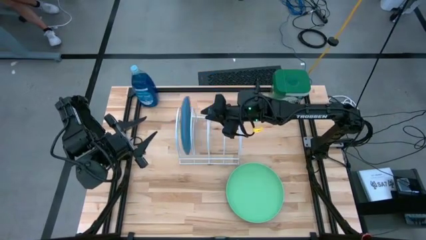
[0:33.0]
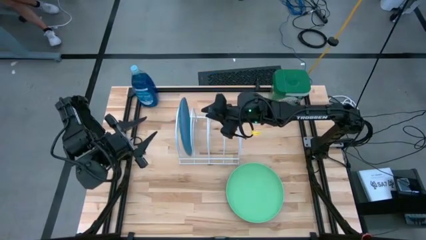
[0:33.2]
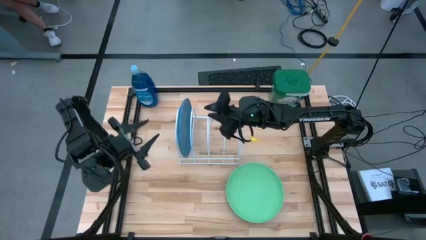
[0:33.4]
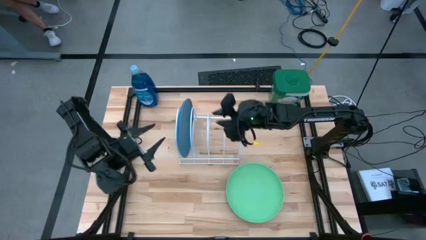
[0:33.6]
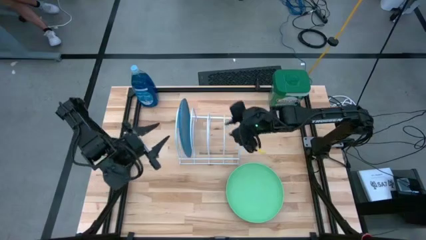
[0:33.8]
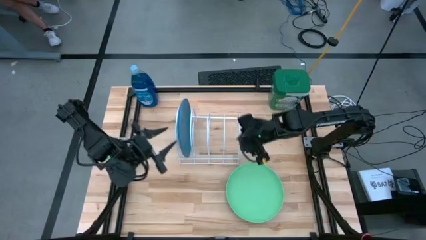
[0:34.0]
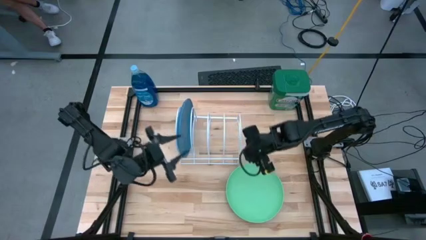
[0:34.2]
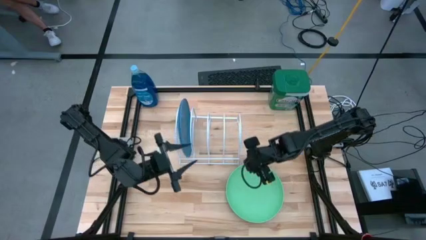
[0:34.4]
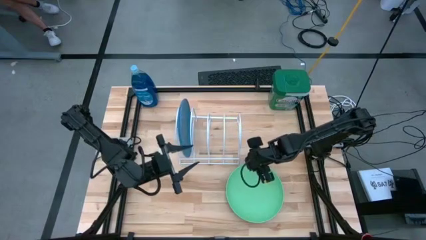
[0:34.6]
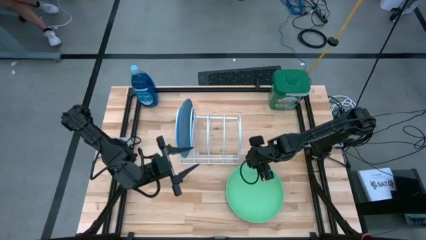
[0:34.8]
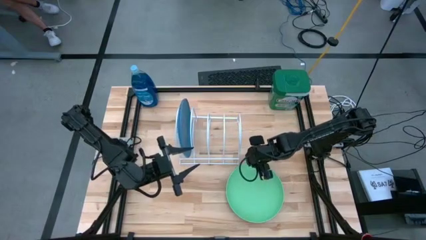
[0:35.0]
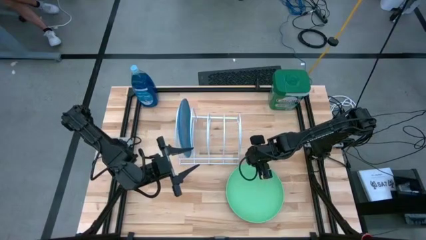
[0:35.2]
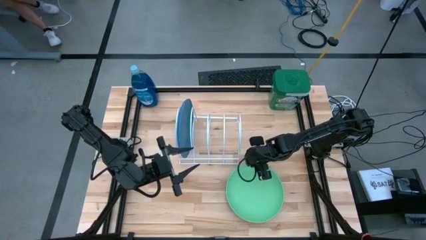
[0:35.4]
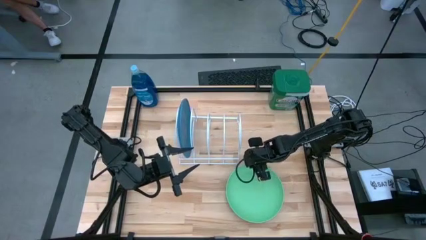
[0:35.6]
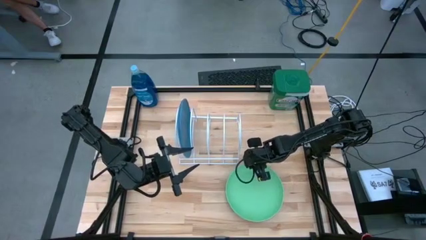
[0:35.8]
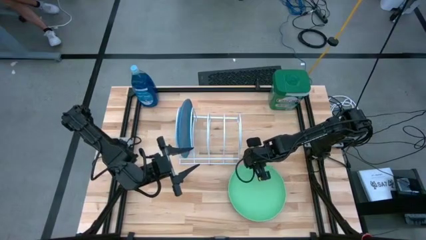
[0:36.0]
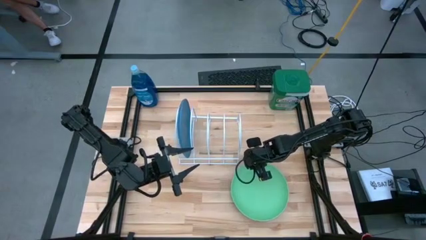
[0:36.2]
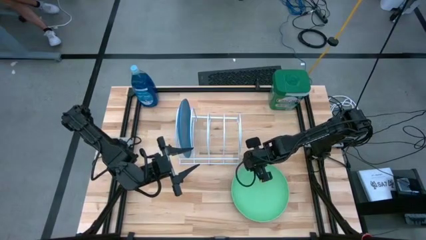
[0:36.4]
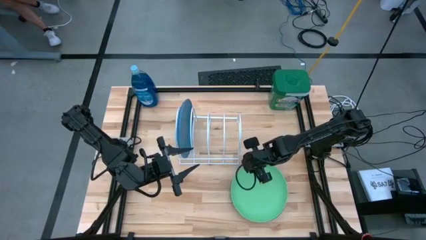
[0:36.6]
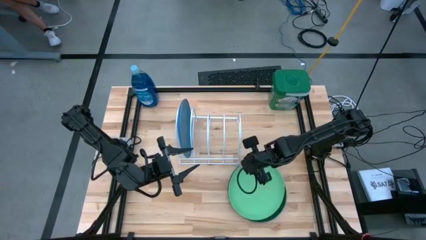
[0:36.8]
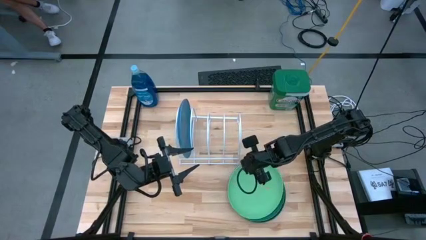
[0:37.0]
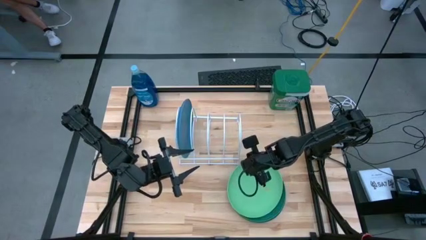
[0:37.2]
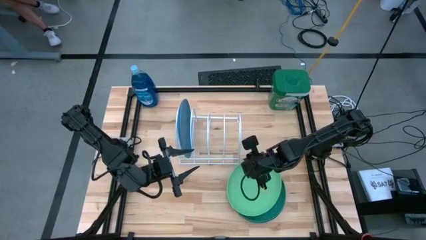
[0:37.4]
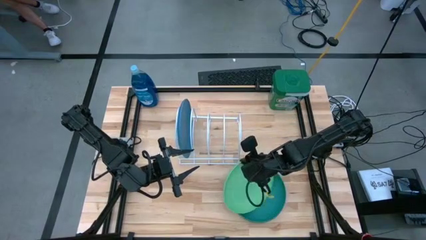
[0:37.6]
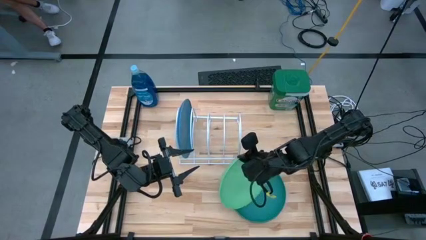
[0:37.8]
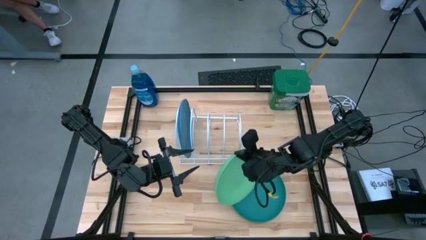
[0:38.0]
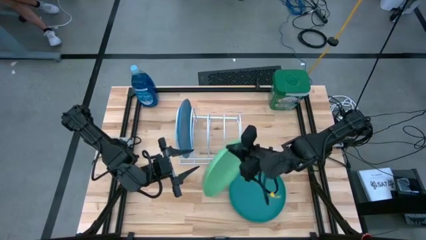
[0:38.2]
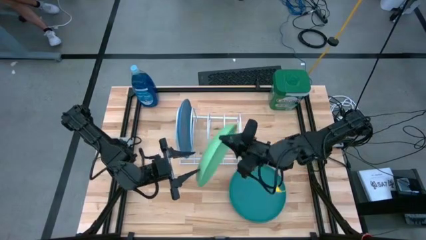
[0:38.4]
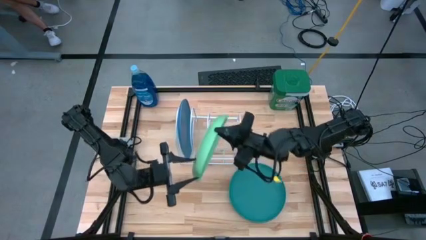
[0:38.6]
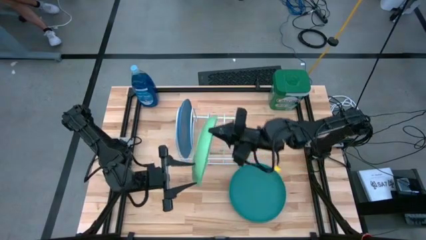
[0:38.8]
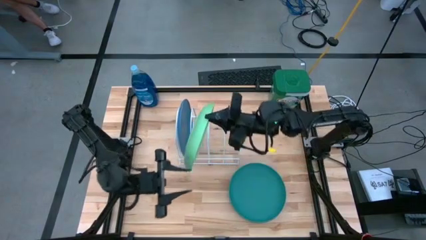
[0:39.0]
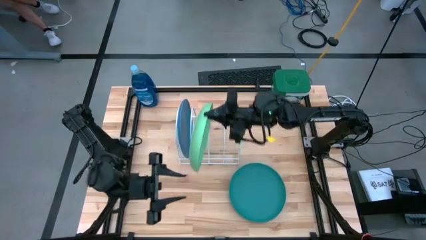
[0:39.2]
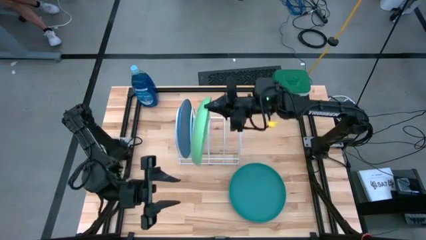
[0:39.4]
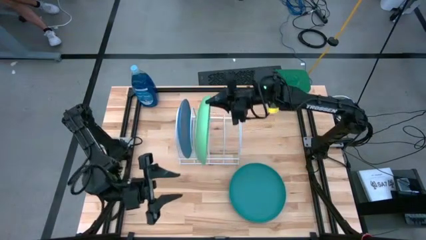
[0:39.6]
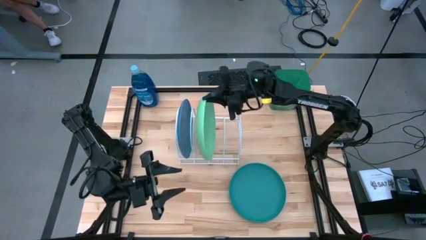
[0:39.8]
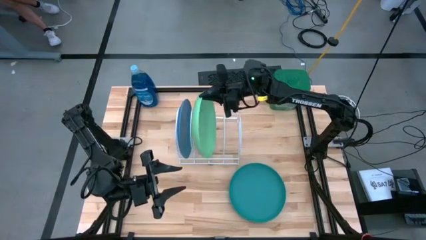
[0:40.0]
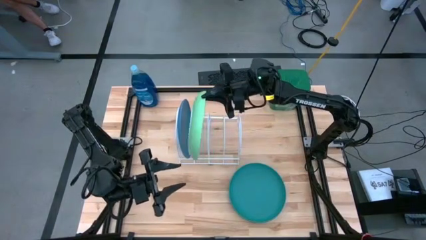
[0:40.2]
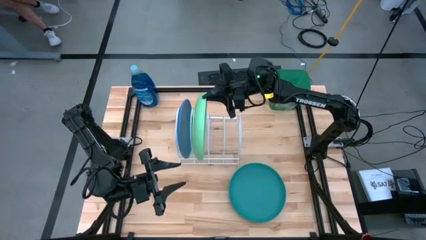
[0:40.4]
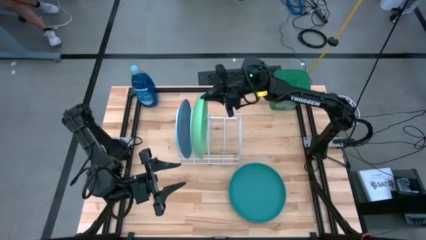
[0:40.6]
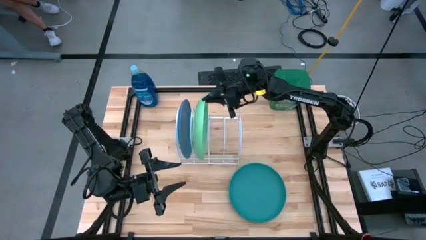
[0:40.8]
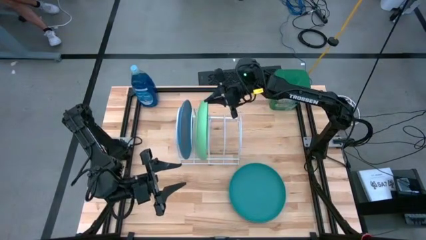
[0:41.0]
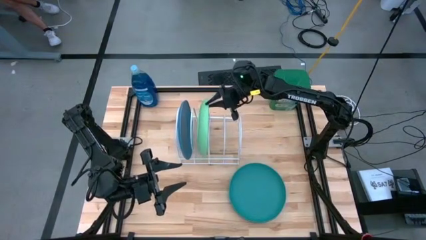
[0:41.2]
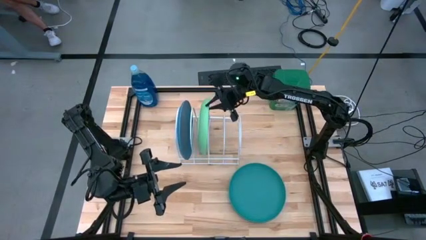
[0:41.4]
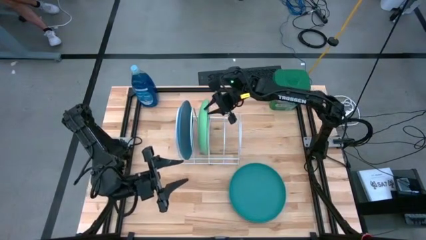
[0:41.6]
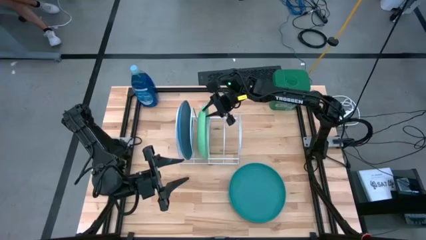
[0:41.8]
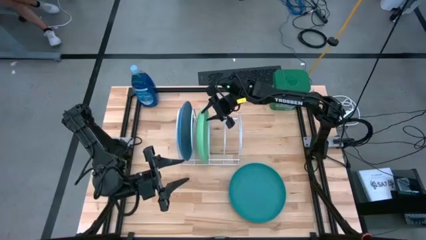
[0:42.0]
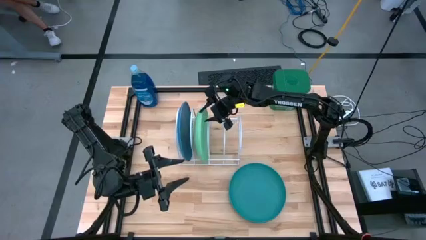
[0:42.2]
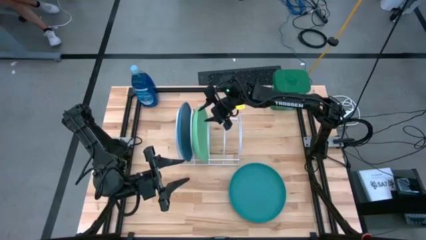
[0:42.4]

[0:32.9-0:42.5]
Task: Sort dishes
Put the light green plate in the dish rack

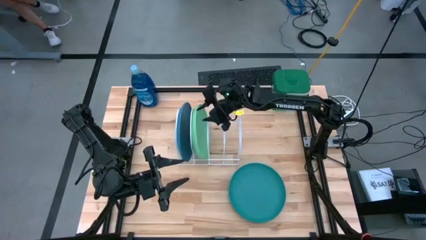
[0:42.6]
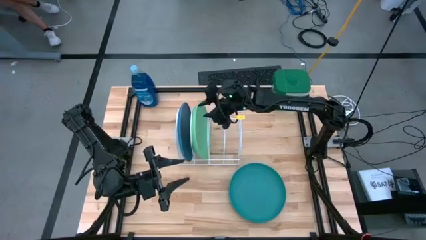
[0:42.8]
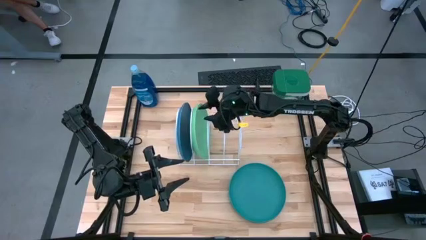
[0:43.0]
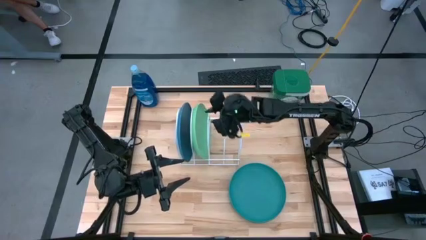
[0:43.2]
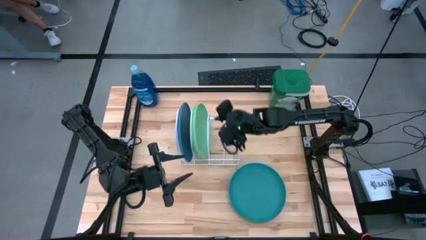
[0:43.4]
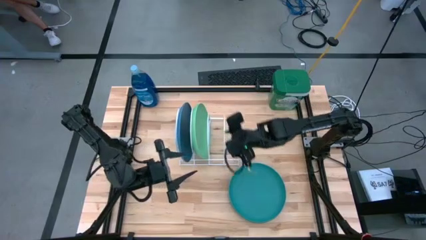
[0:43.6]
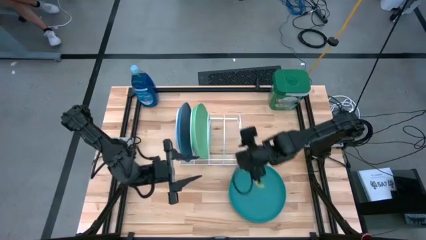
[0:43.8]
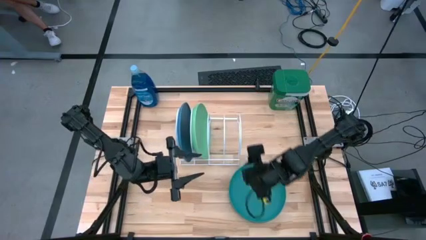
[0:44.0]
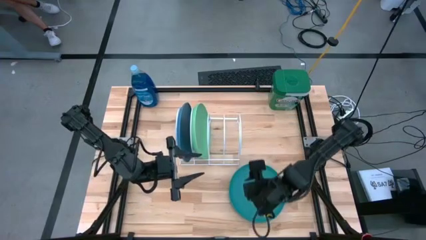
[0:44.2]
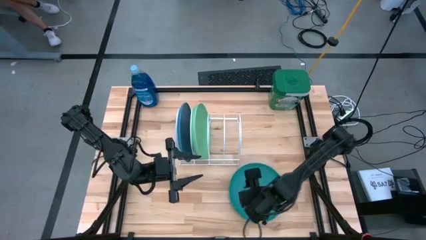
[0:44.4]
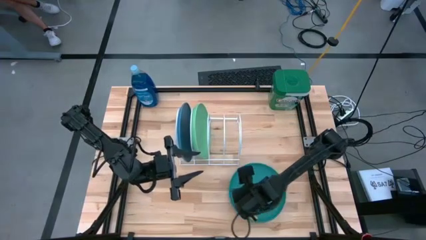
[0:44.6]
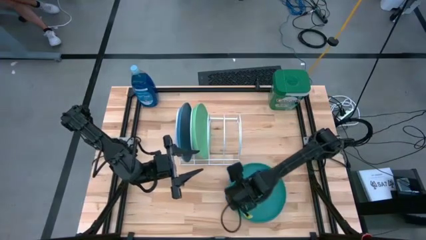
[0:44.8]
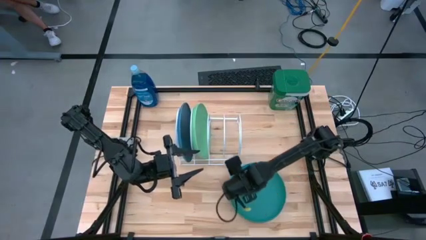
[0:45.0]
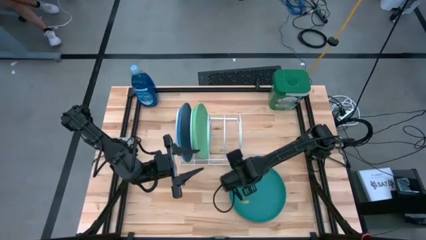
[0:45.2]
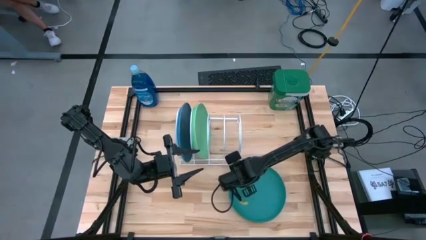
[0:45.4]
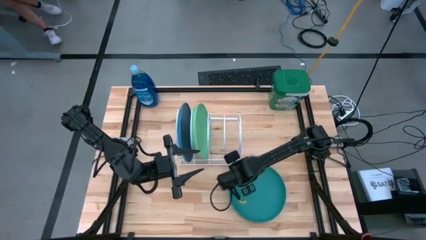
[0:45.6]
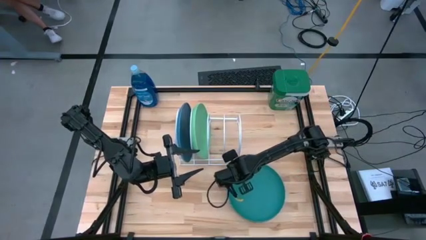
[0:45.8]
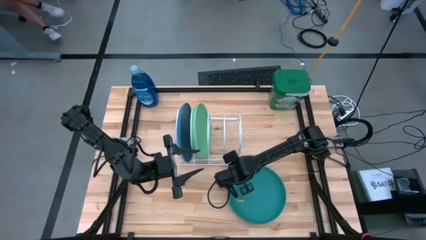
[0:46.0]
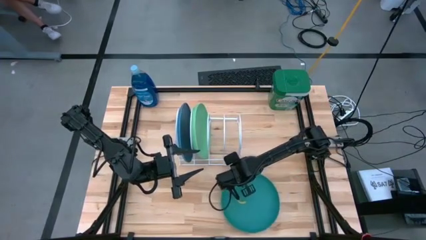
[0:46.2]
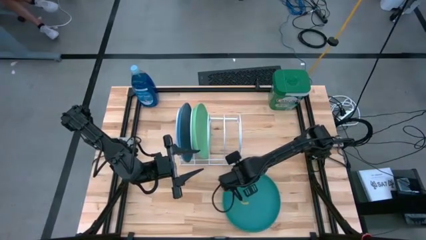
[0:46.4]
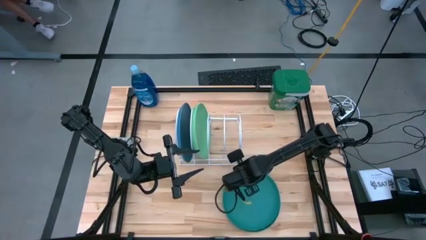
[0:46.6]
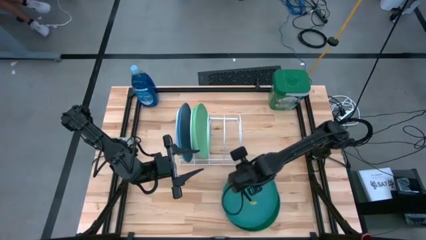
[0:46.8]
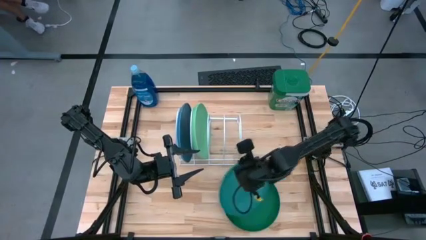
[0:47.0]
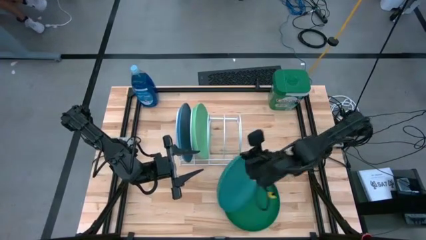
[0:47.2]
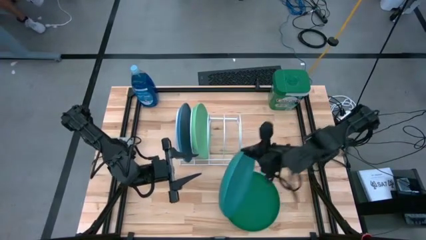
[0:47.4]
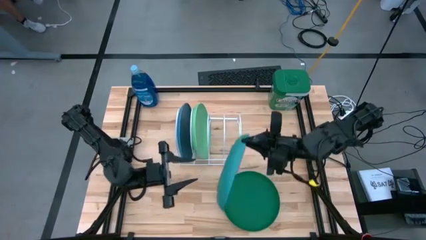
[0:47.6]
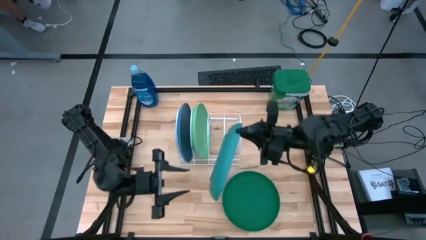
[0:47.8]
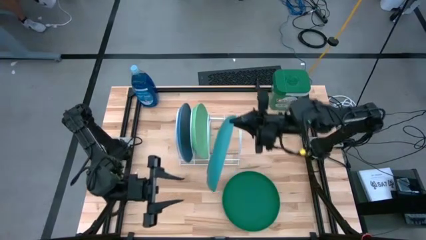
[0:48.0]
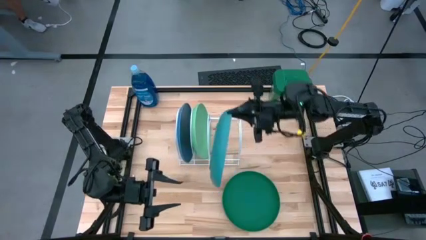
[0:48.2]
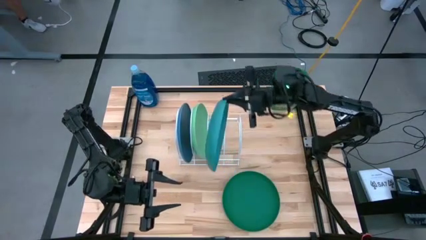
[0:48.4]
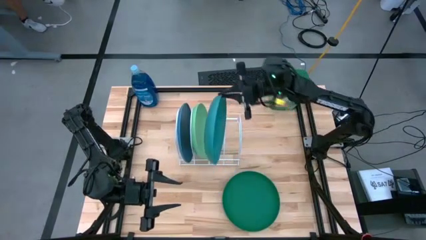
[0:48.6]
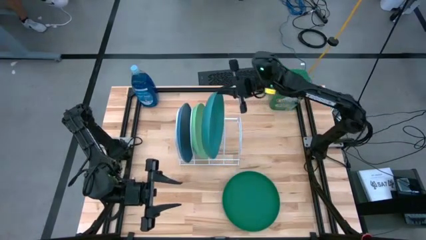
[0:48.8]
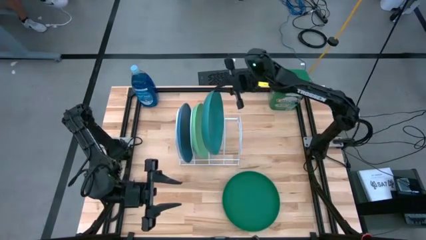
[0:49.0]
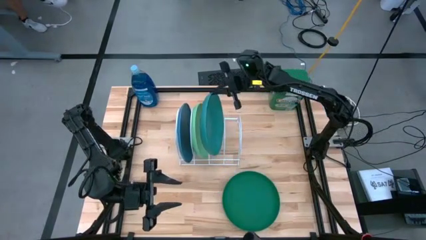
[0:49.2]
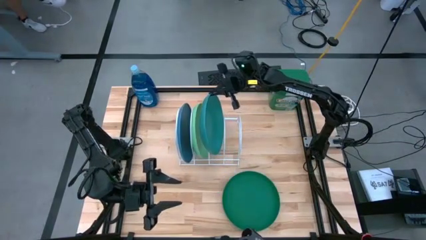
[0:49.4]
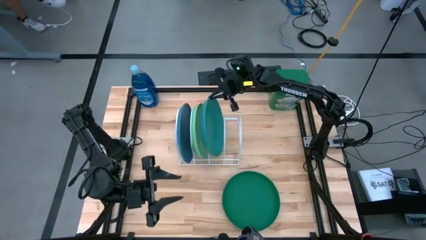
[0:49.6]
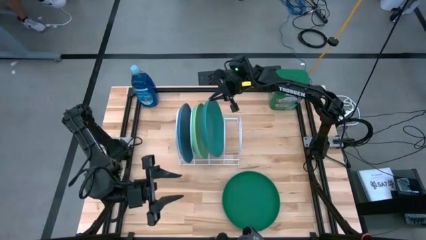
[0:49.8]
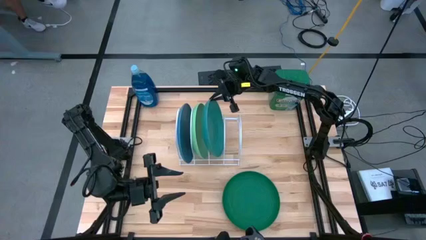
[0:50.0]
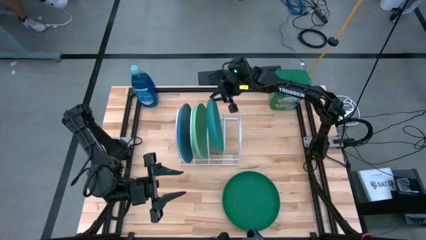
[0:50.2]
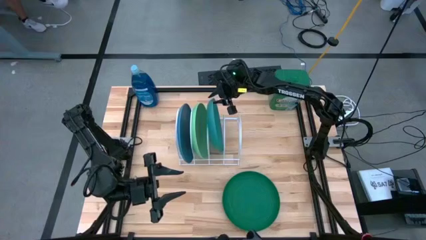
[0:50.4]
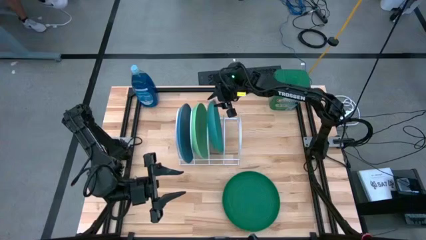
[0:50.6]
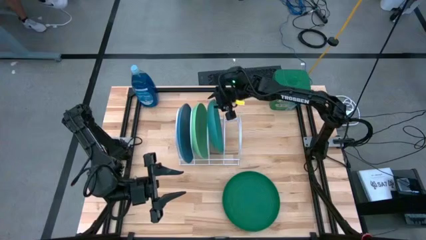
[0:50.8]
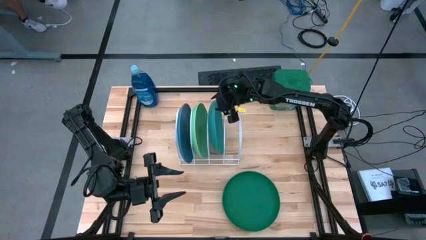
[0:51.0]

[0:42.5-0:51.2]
Put the light blue plate in the dish rack
